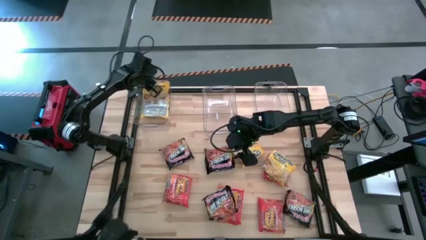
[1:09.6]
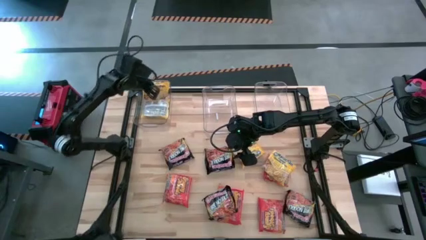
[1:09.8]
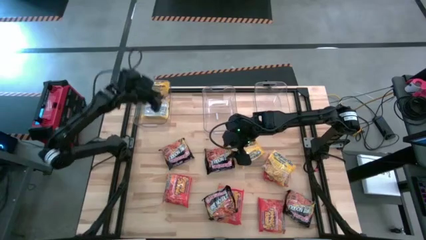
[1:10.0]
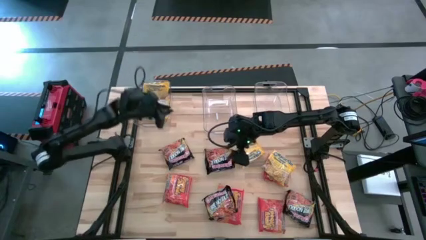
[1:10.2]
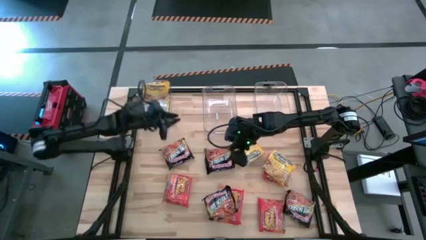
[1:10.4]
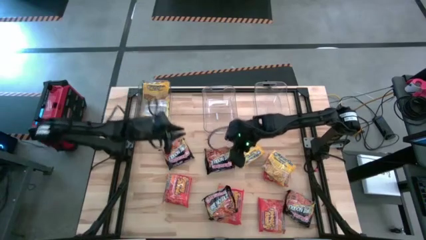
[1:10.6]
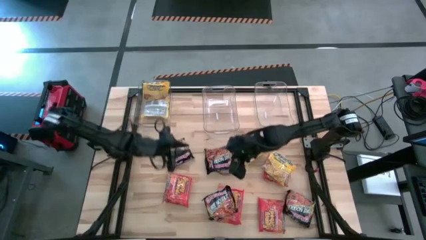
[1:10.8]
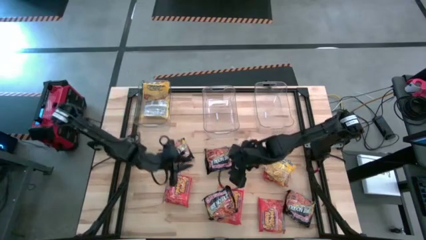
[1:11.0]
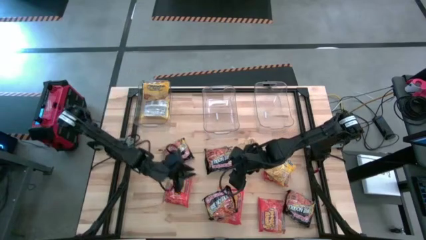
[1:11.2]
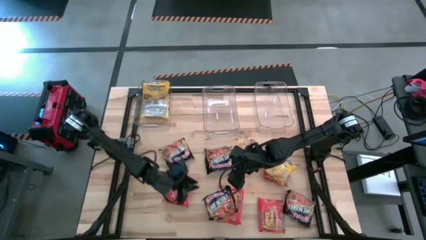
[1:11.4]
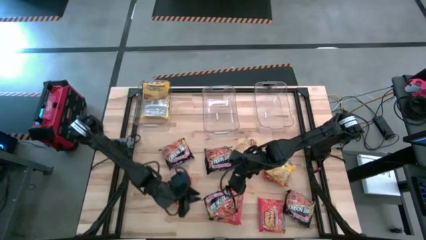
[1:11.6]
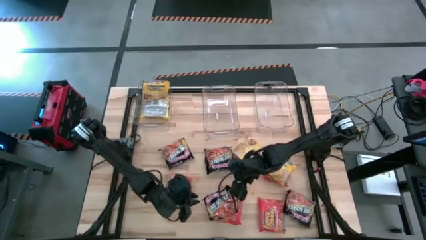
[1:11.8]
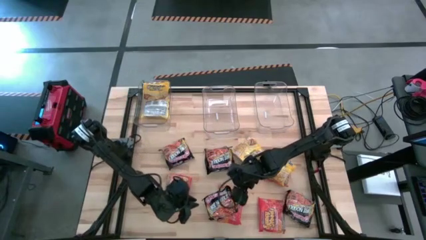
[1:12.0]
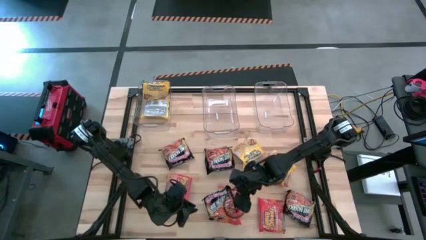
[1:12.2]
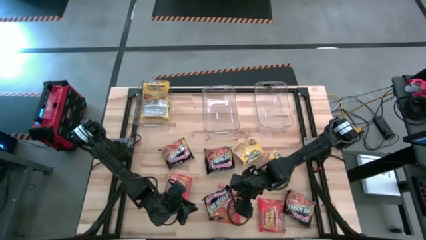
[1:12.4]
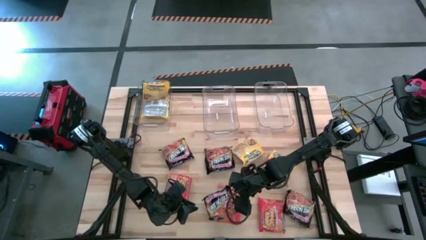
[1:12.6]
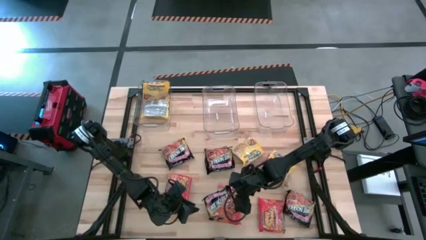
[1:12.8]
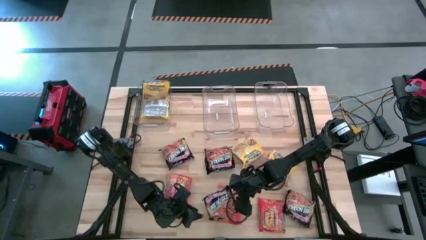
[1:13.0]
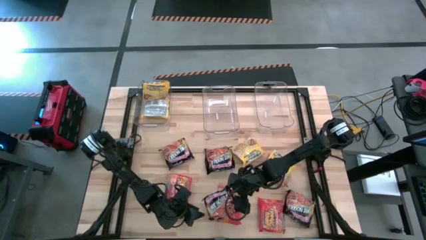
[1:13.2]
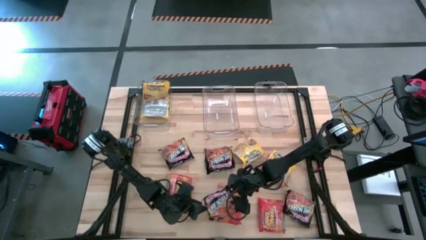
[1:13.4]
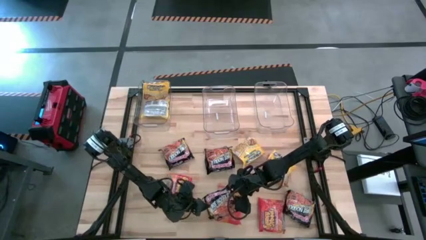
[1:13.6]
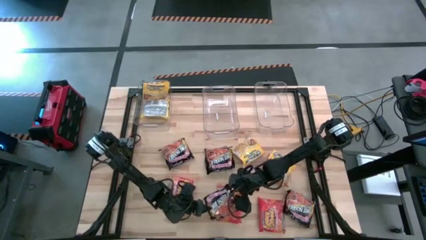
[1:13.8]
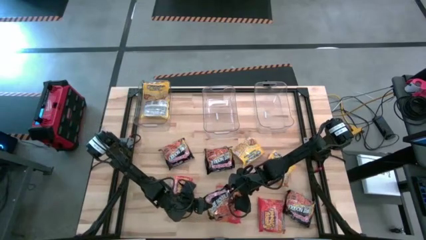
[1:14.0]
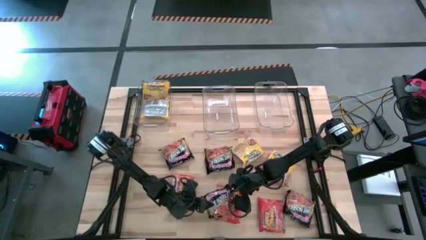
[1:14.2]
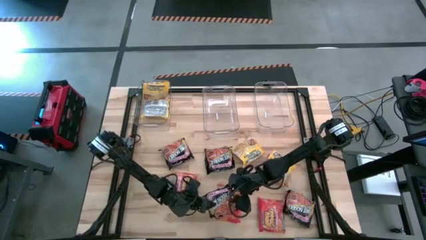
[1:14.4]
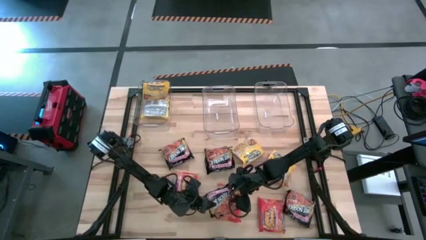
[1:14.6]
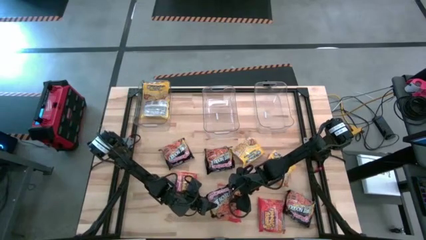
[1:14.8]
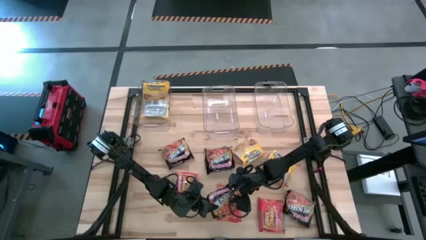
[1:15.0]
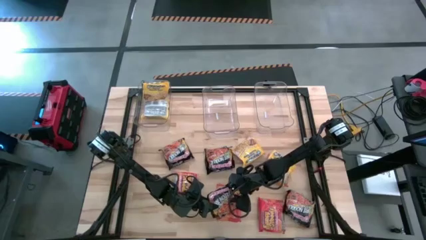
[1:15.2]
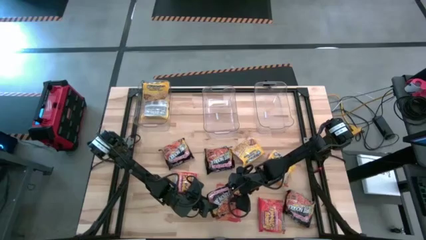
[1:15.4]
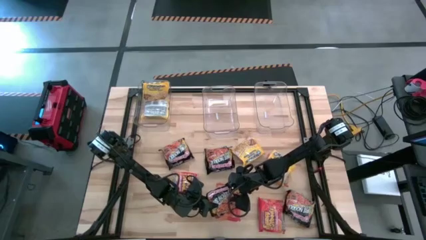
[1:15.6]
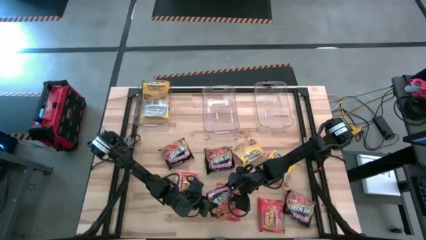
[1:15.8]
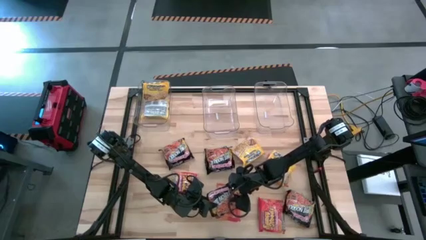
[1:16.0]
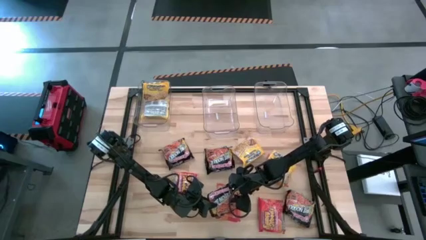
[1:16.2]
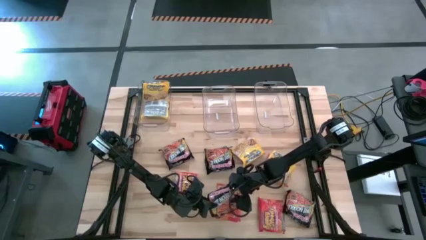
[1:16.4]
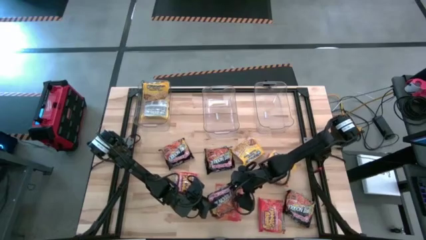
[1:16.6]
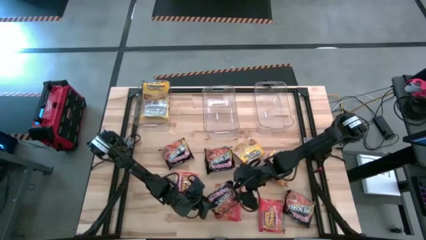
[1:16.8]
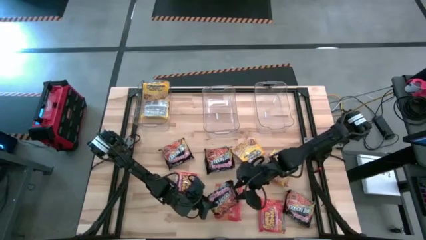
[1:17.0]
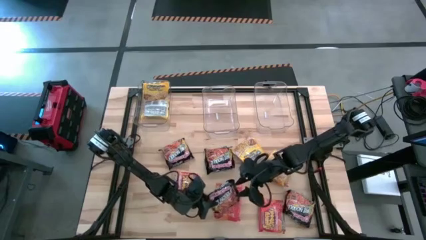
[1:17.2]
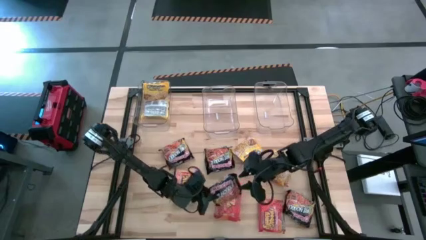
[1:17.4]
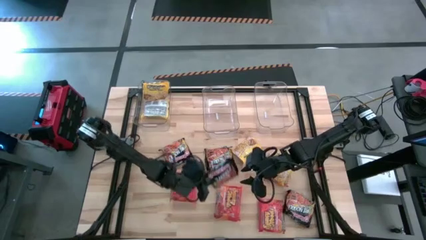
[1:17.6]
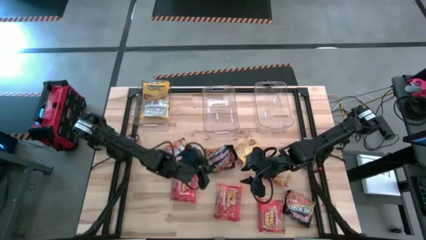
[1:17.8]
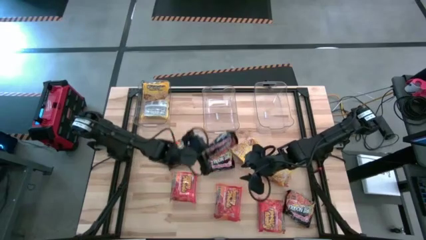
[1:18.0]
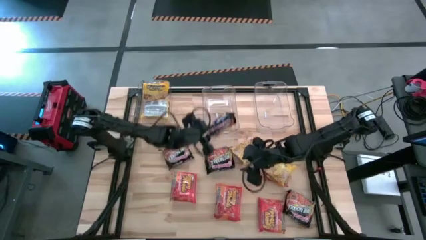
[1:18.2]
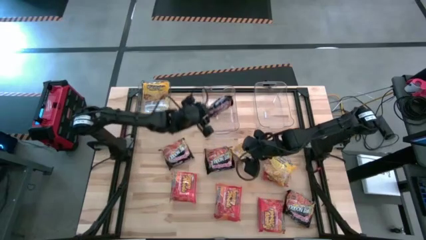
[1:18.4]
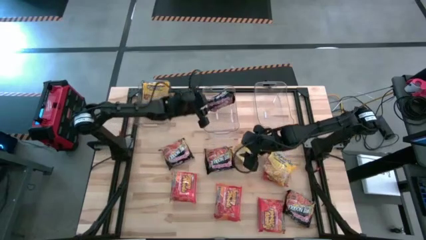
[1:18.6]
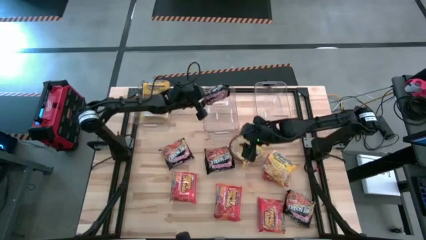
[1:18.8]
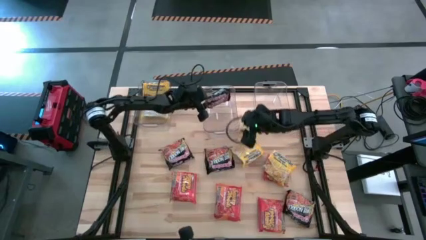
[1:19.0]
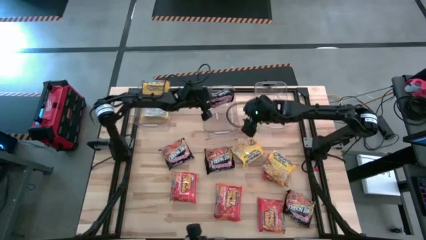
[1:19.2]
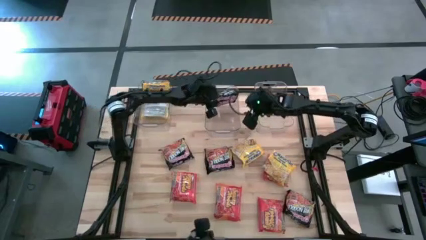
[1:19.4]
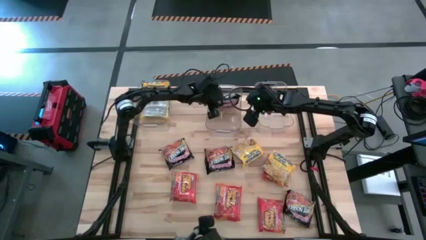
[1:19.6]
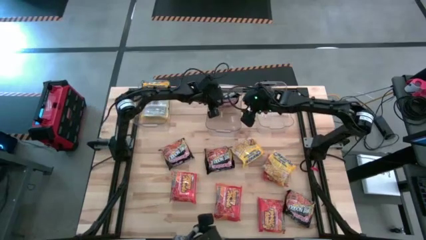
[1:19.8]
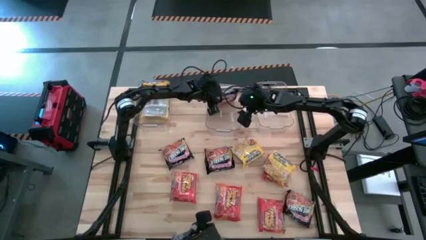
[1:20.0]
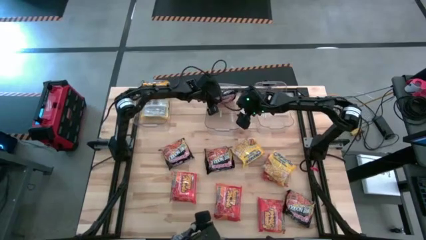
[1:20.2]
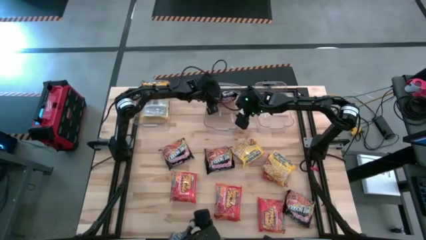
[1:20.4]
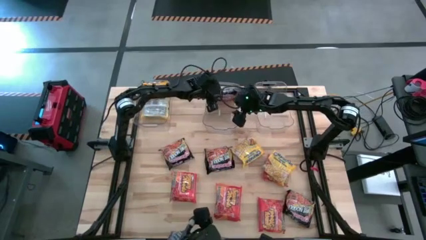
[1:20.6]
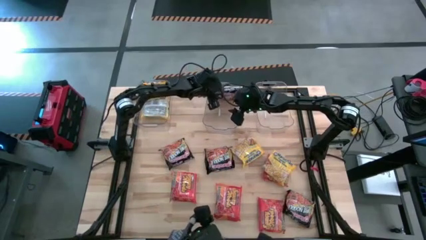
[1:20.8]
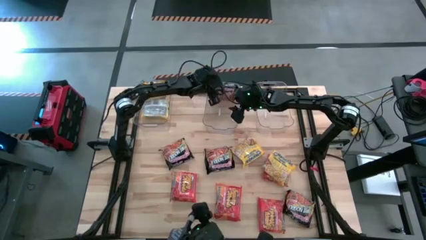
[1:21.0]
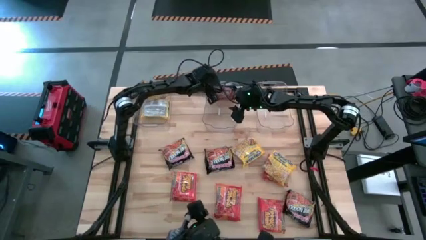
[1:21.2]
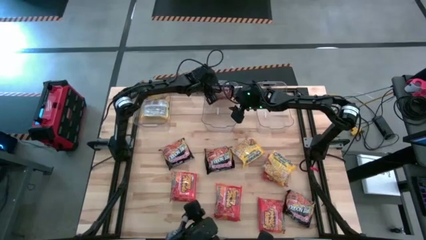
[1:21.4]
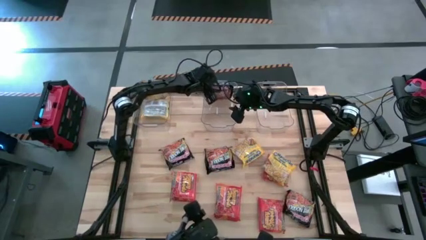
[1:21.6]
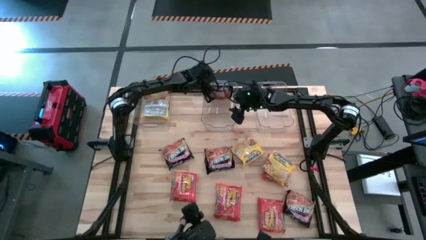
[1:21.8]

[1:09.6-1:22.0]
Task: Sort Maruchan noodles
Put the black noodle pack into the middle transparent bin
